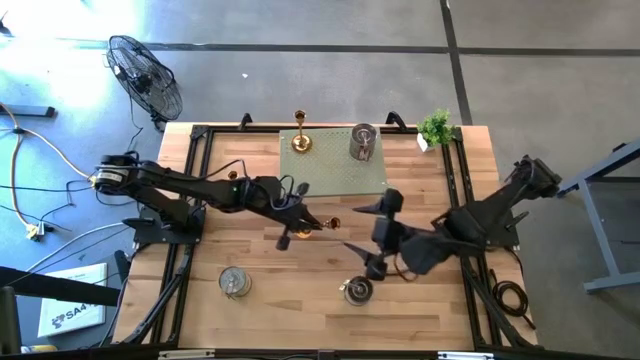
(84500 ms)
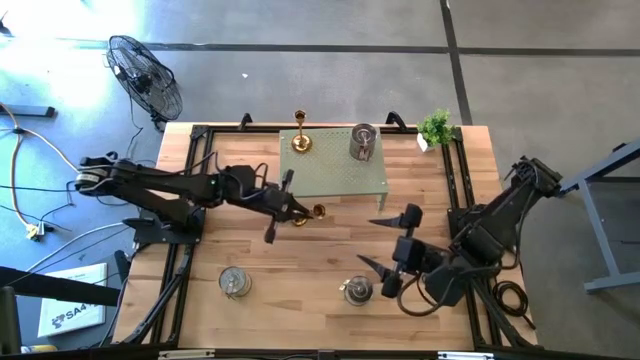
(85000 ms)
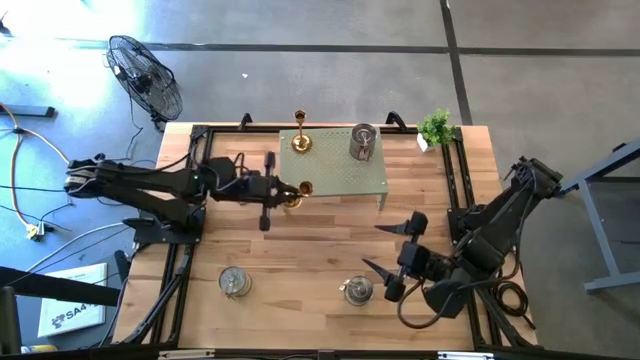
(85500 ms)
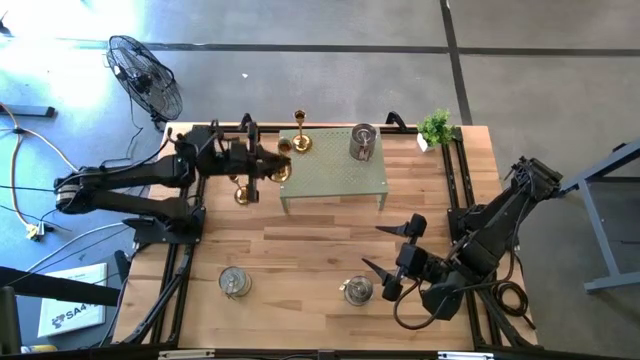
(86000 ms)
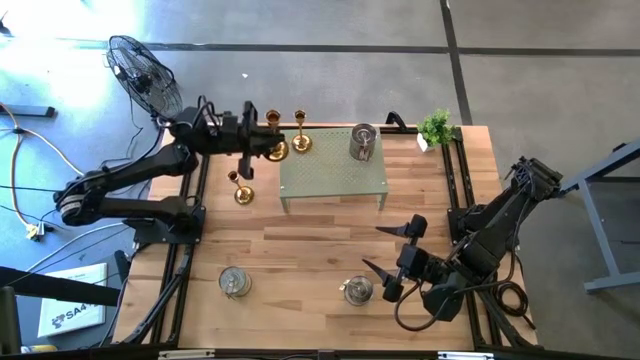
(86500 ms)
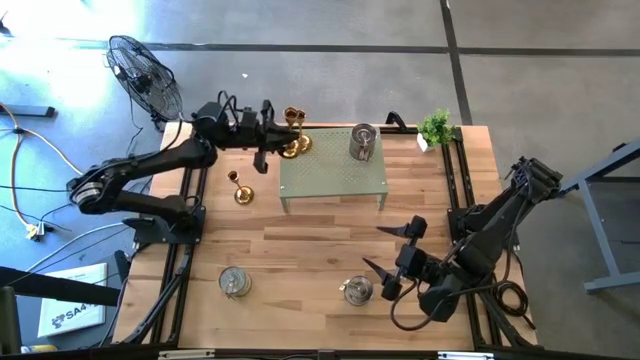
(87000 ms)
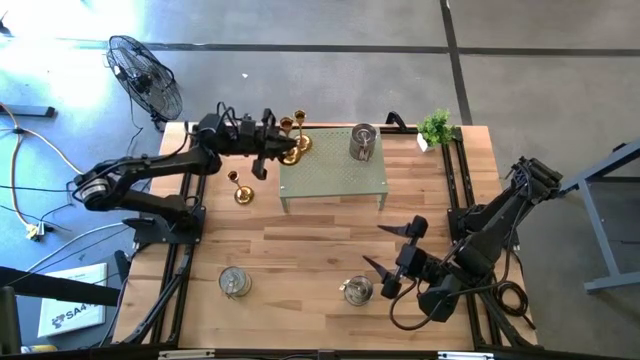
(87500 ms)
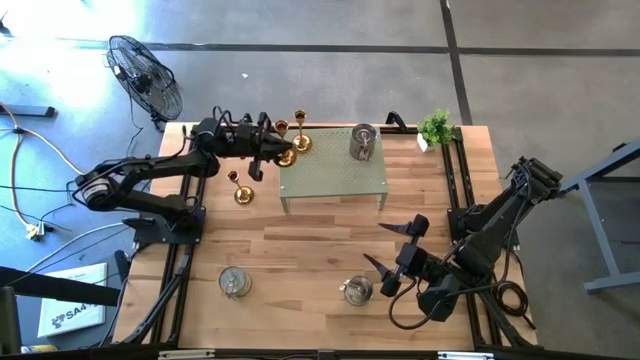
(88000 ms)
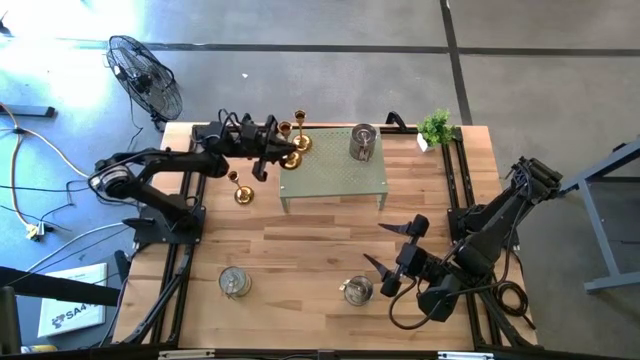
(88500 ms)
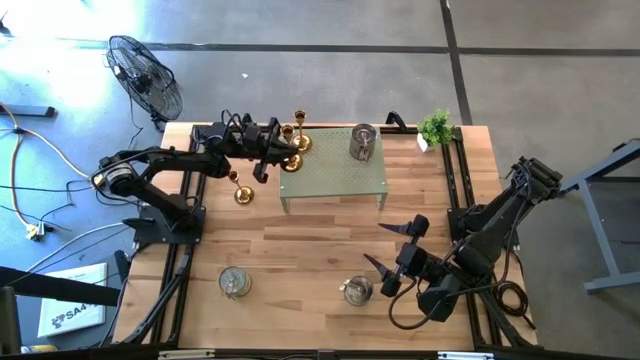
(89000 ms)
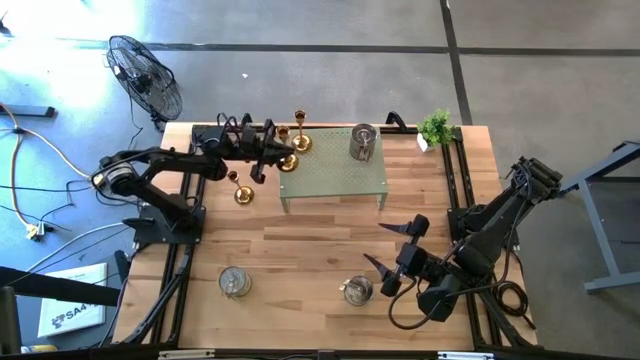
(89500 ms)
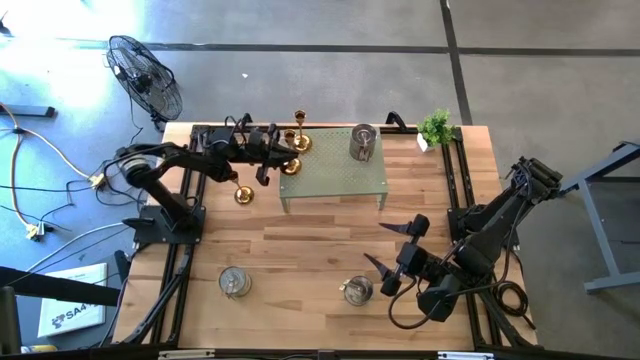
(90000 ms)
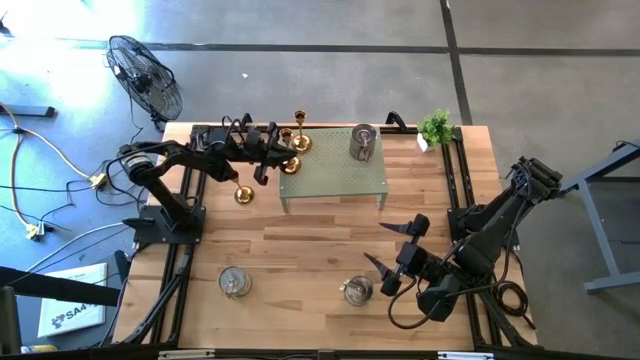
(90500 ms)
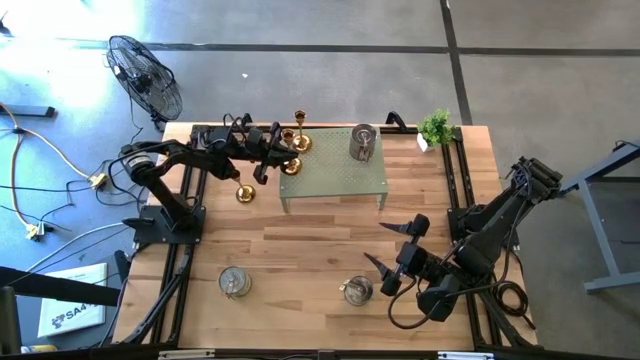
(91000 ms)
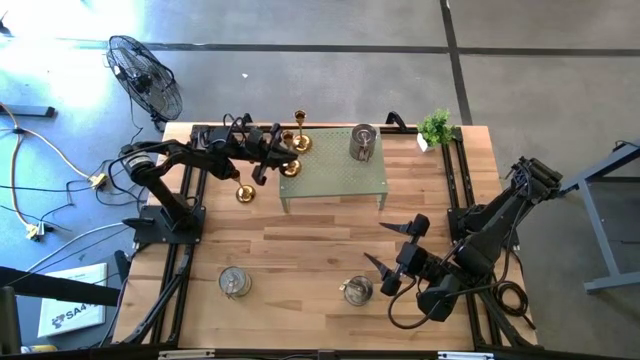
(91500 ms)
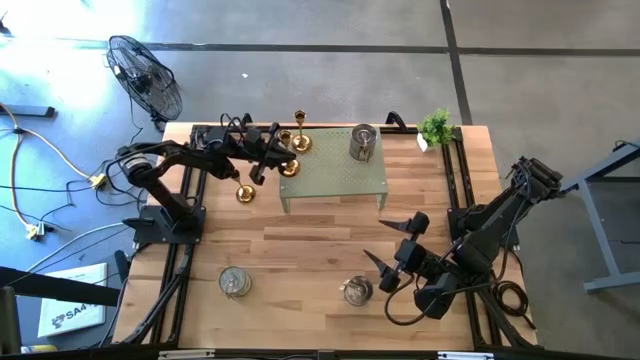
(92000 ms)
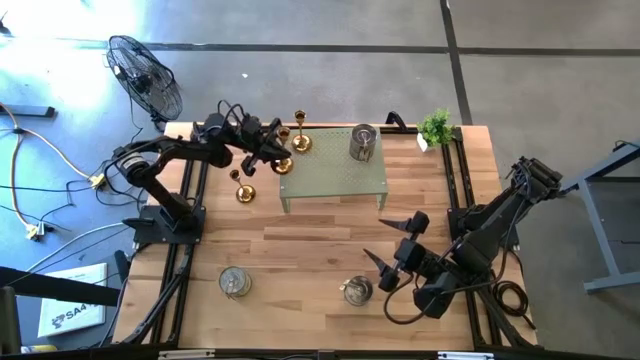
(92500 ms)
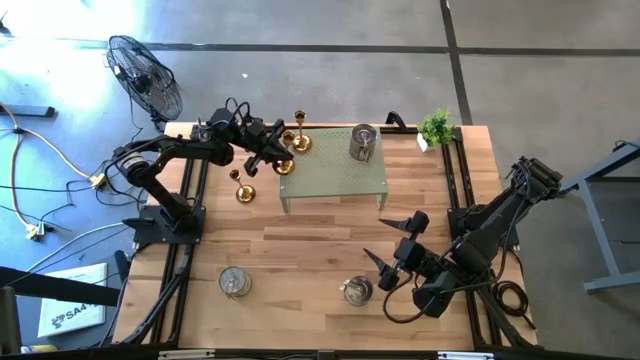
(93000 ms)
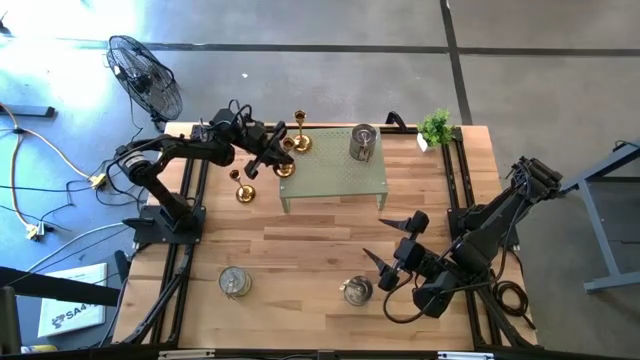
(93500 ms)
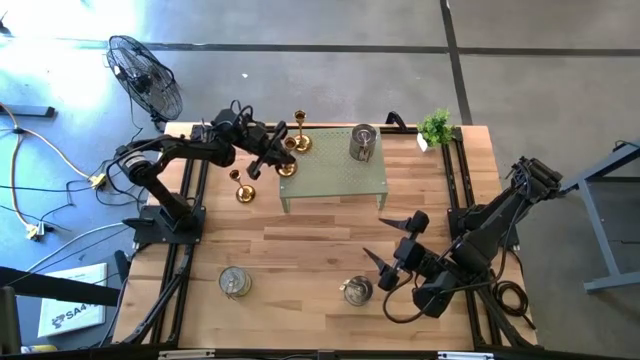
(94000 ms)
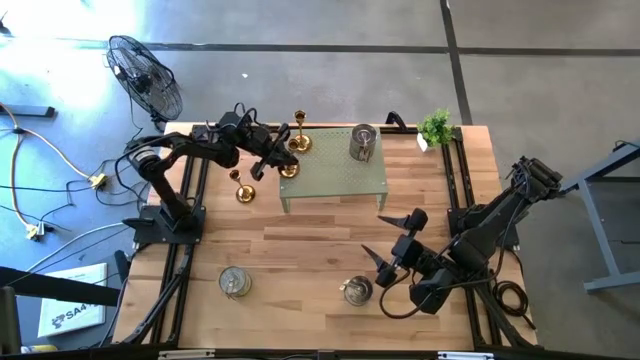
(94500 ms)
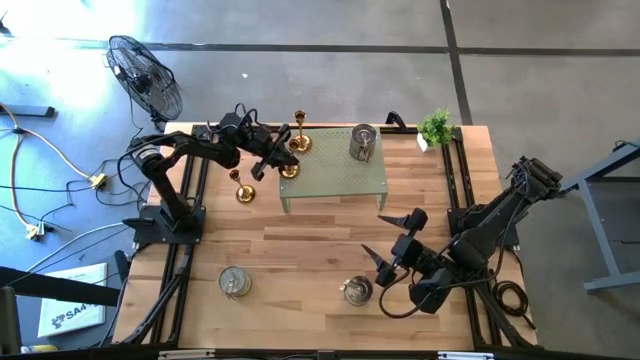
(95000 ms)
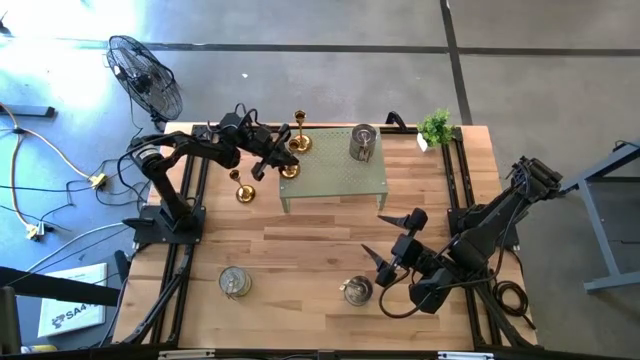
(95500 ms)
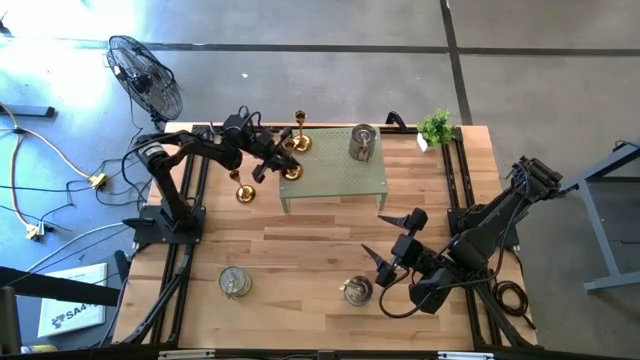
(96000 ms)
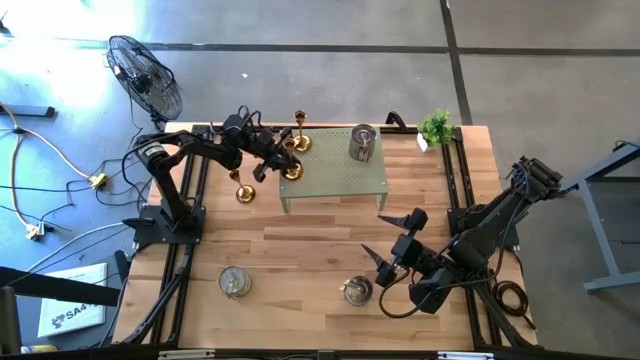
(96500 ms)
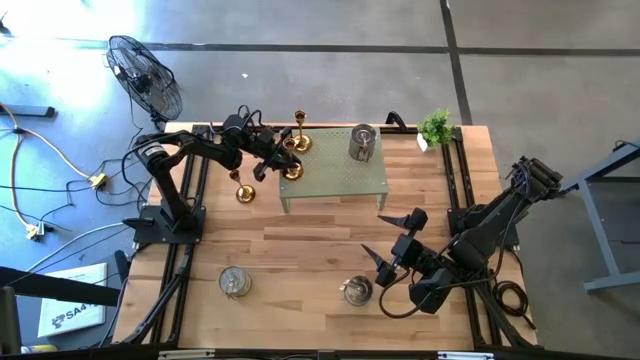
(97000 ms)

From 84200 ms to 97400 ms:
Task: Pick & Place candle stick holders
Put the bottom gold candle holder on the shelf

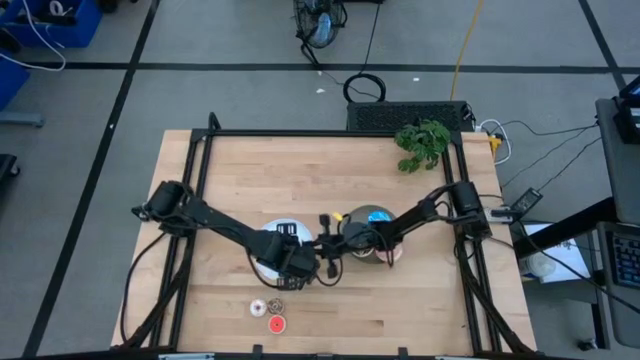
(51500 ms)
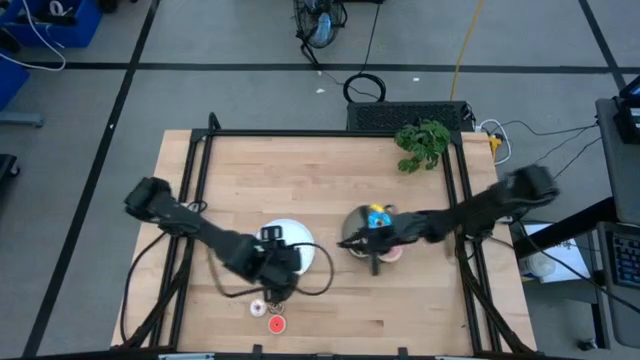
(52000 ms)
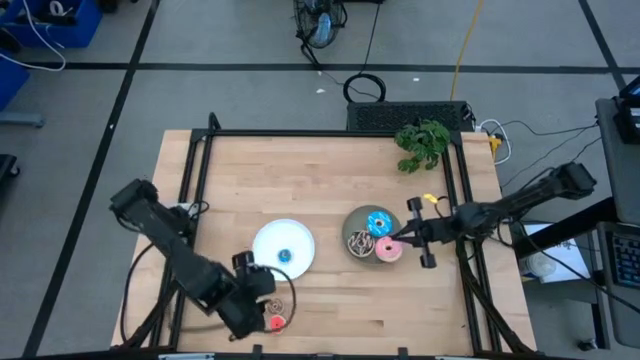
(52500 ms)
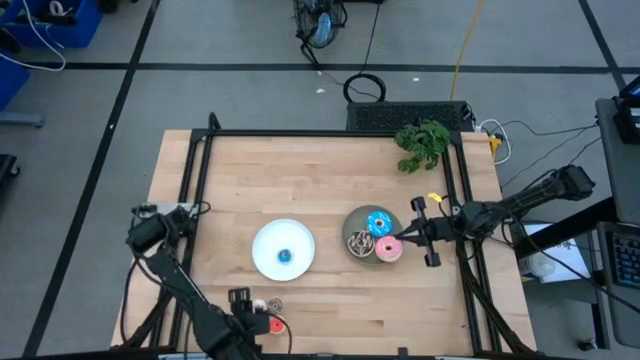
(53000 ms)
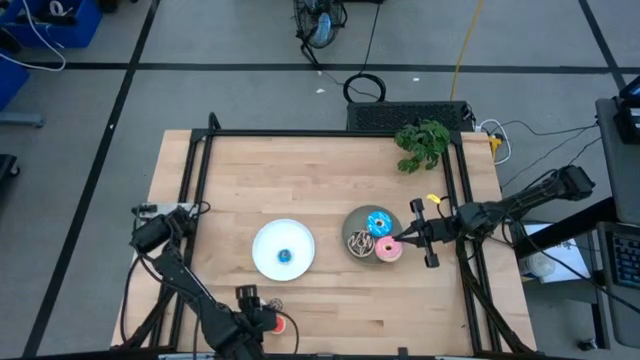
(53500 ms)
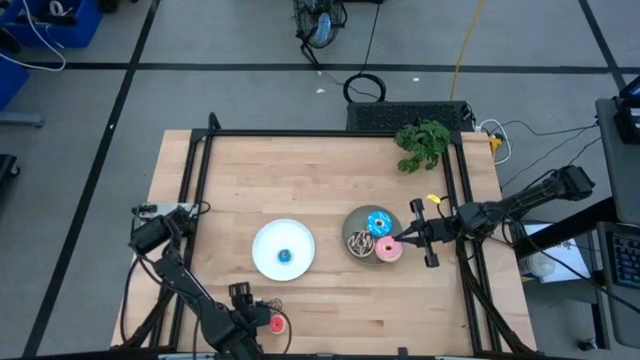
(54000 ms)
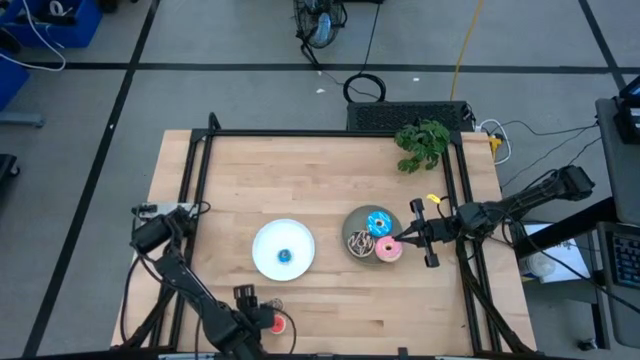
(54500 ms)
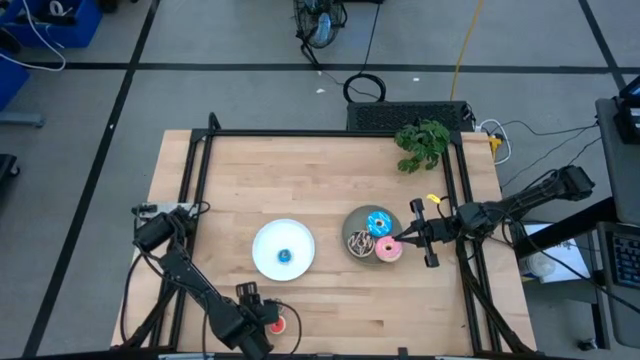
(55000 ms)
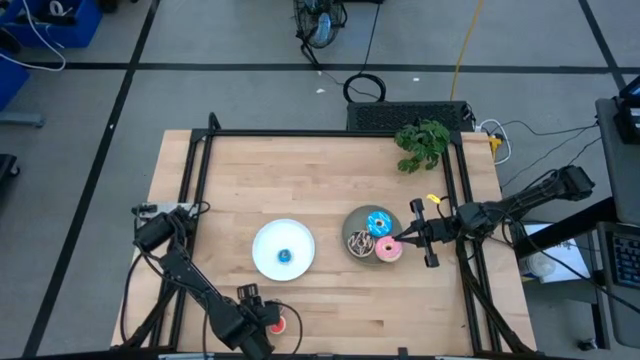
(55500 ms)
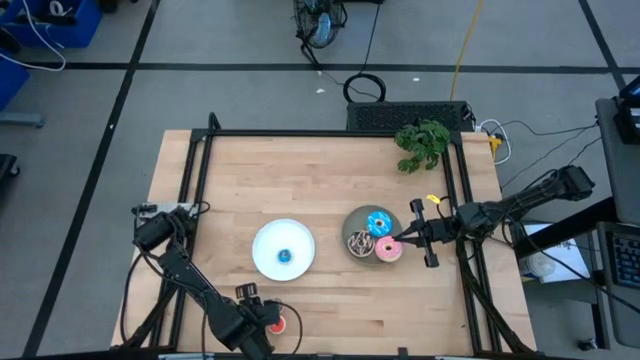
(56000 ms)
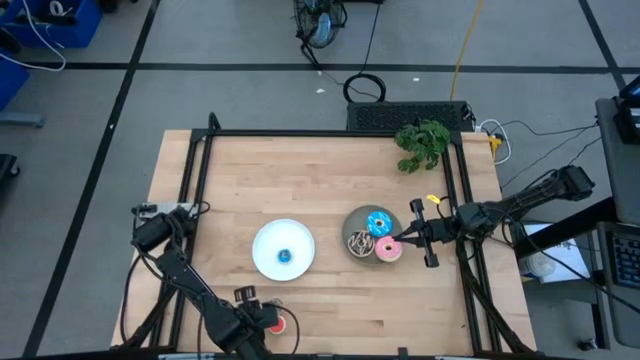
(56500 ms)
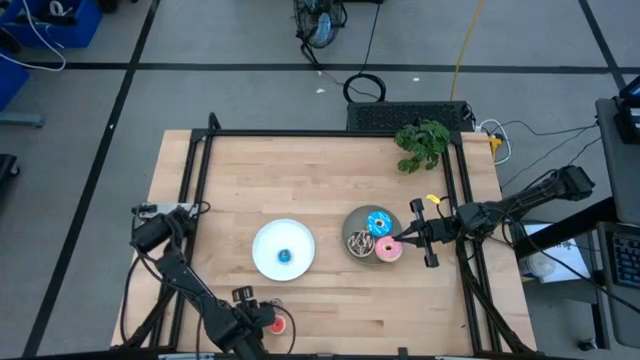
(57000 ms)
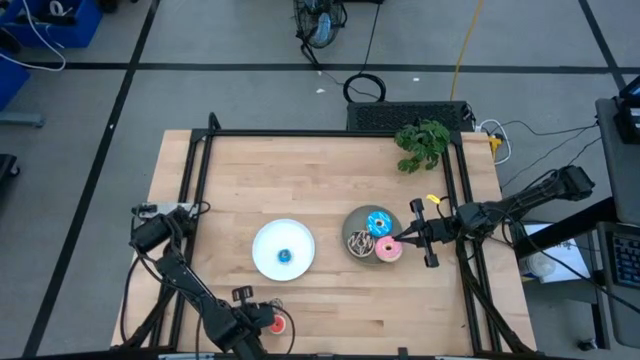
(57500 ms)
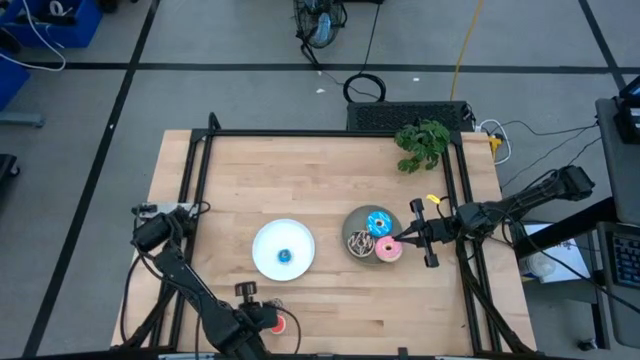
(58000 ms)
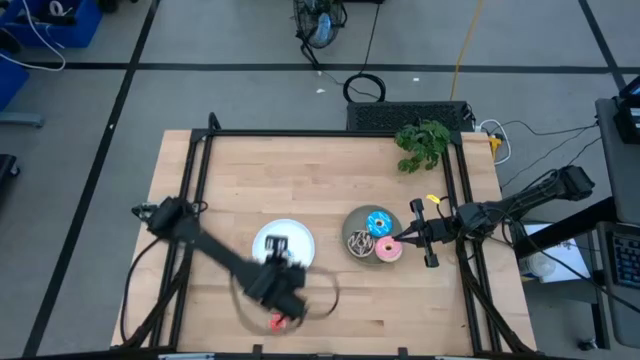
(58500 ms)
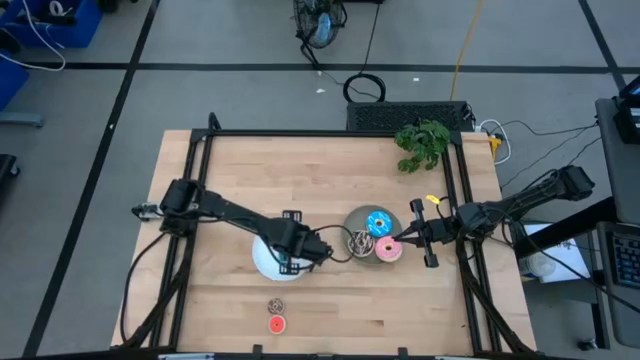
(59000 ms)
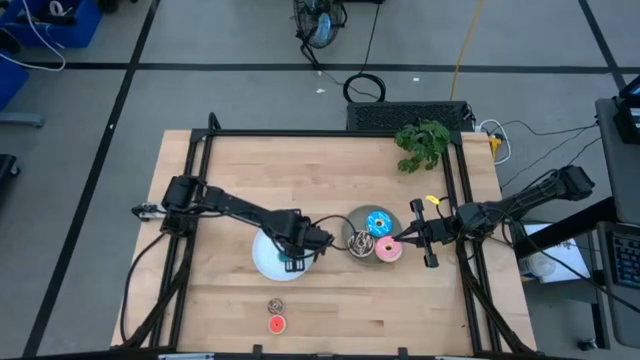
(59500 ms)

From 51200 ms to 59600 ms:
Task: Pick & Place donuts
Put the small white donut on the white plate
